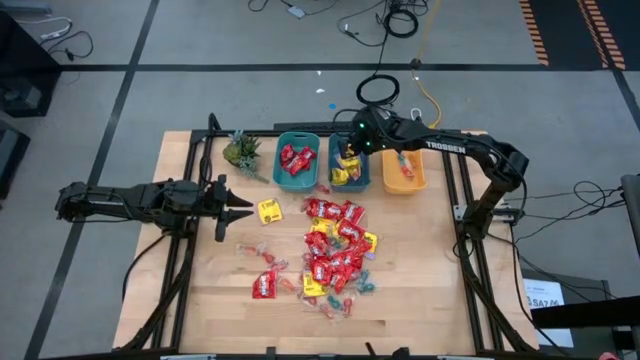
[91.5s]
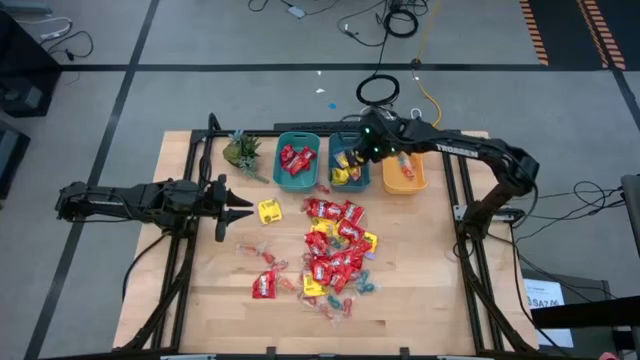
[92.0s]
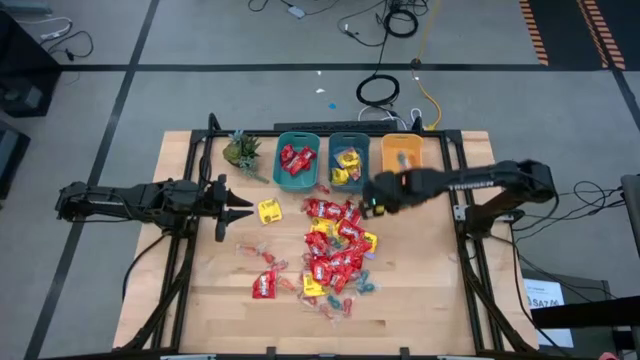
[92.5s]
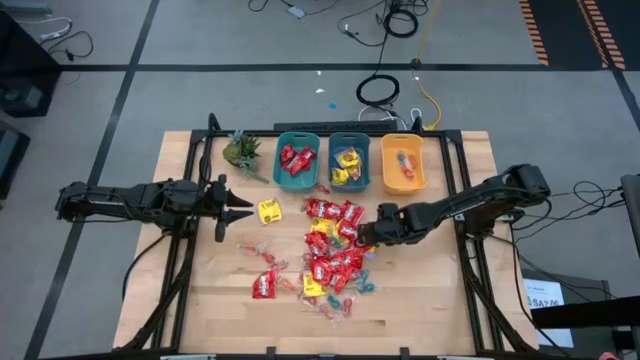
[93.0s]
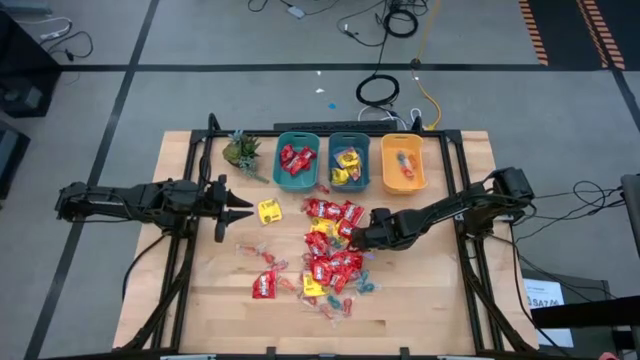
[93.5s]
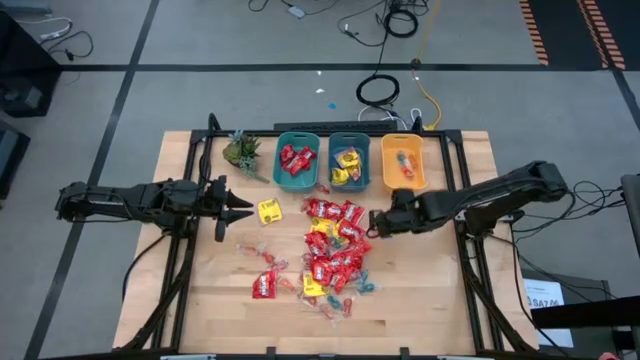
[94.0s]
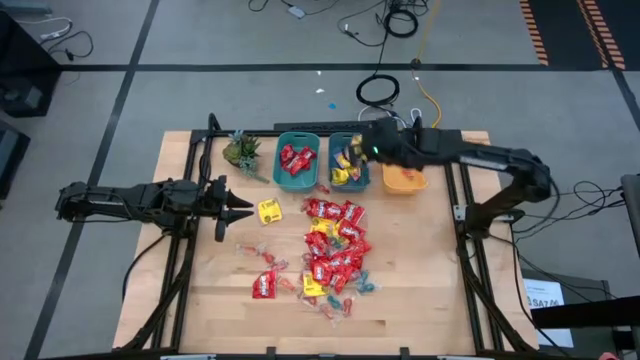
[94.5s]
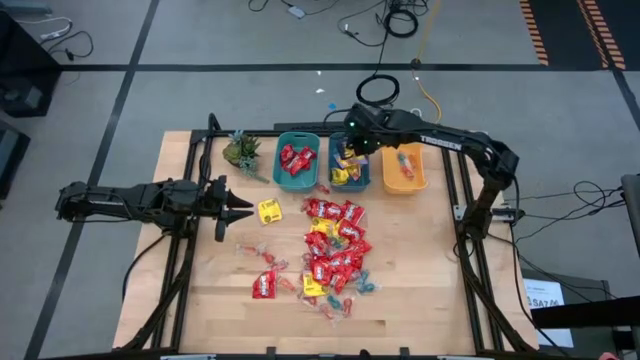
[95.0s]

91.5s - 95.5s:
Task: Sort candy
Put the yellow candy into the blue bin

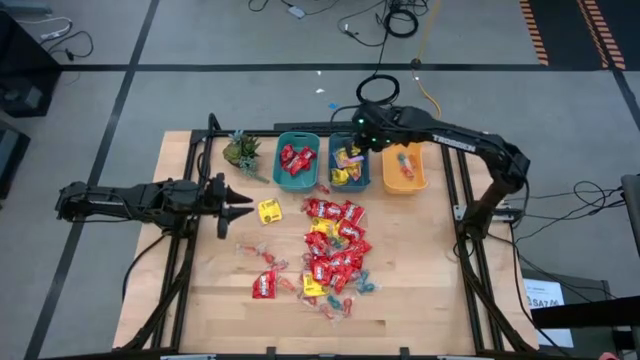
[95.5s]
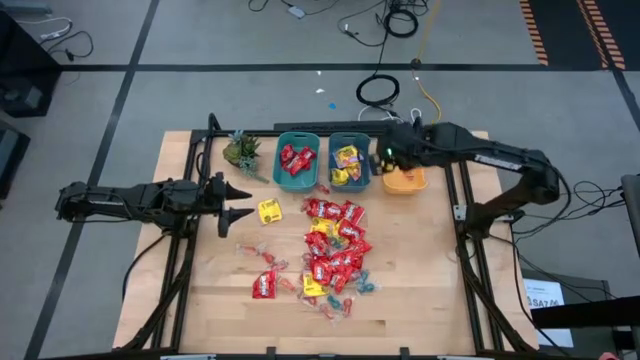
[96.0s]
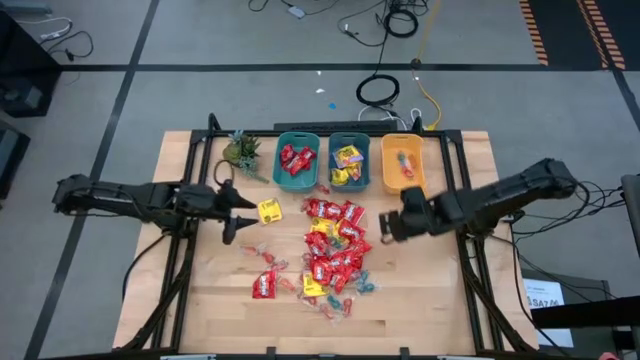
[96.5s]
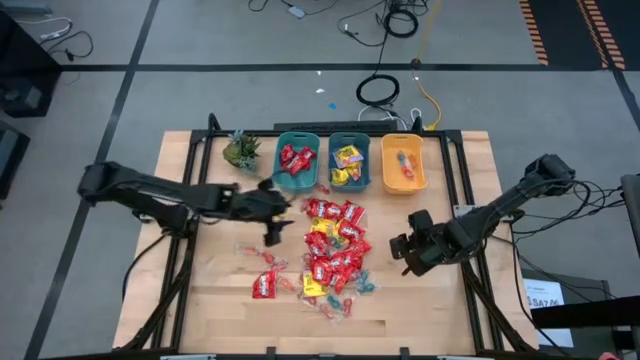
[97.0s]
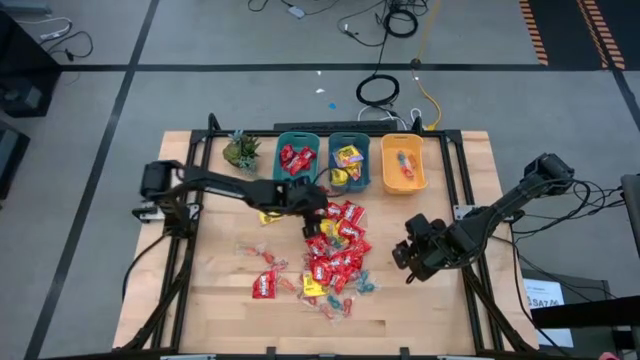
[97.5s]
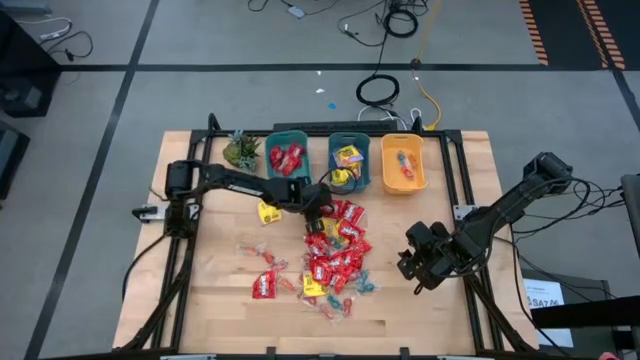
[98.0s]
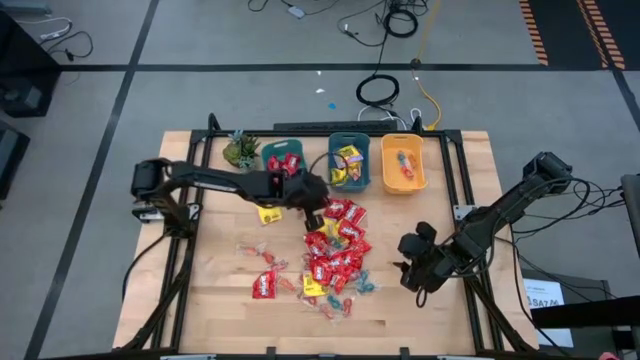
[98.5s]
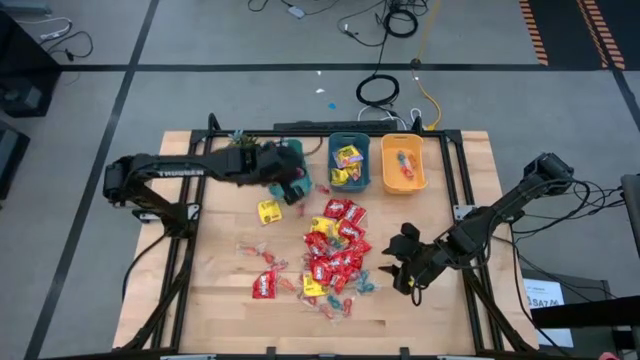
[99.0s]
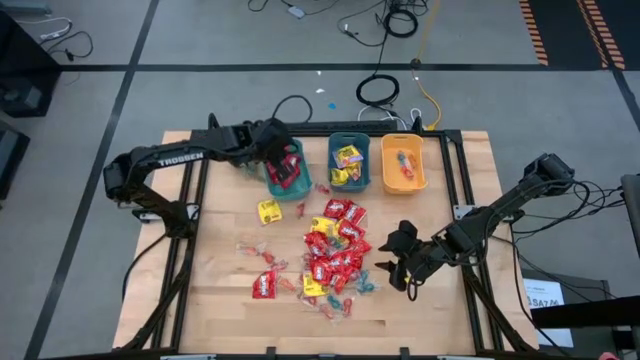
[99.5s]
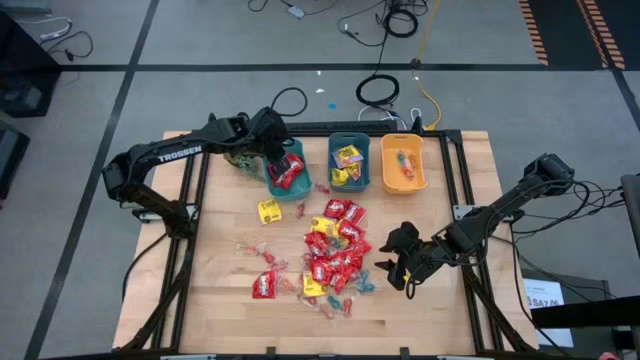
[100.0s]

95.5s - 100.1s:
Put the red candy into the green bin

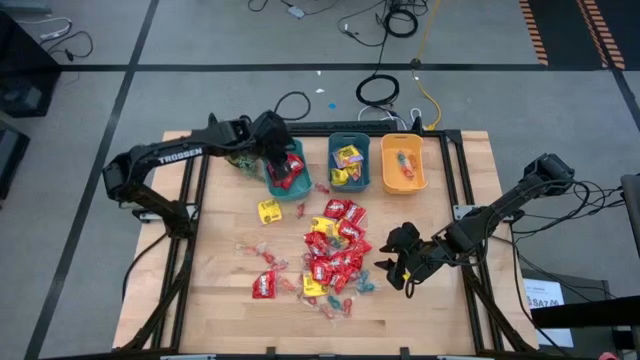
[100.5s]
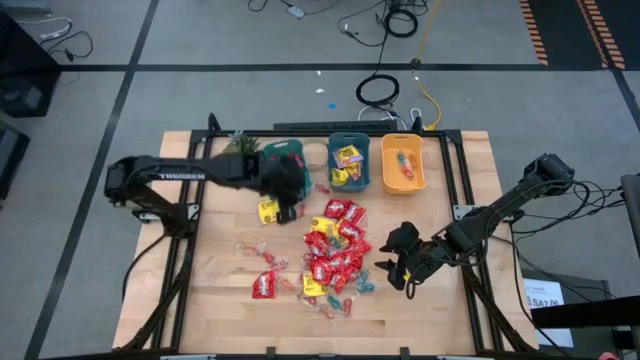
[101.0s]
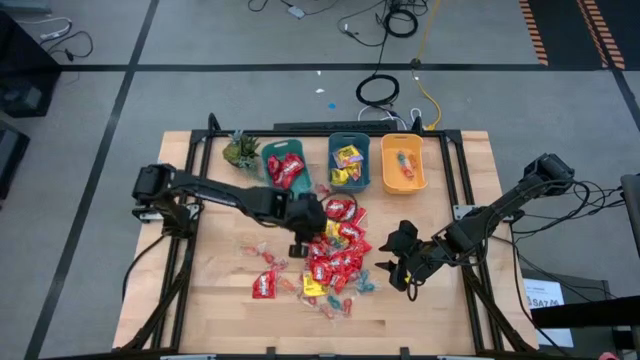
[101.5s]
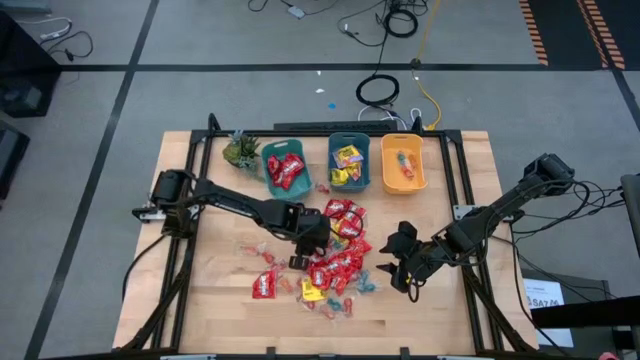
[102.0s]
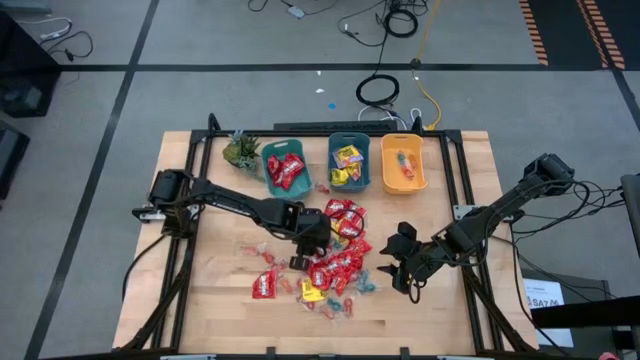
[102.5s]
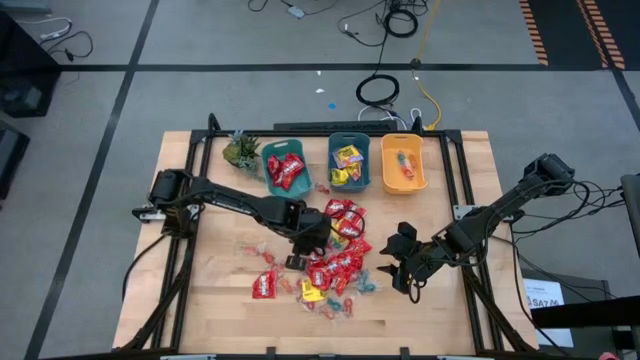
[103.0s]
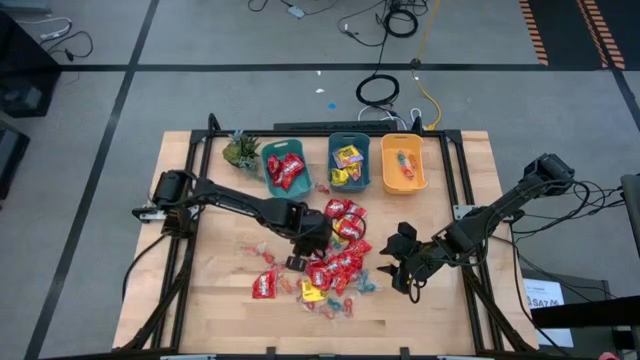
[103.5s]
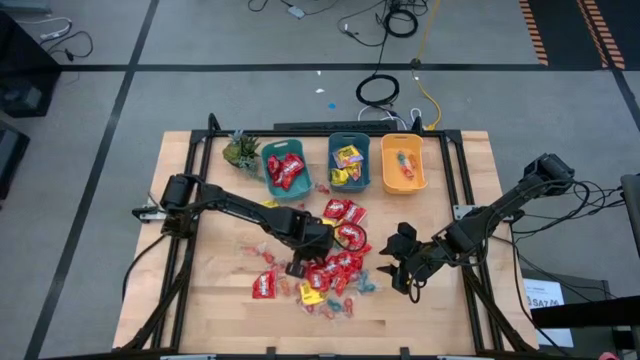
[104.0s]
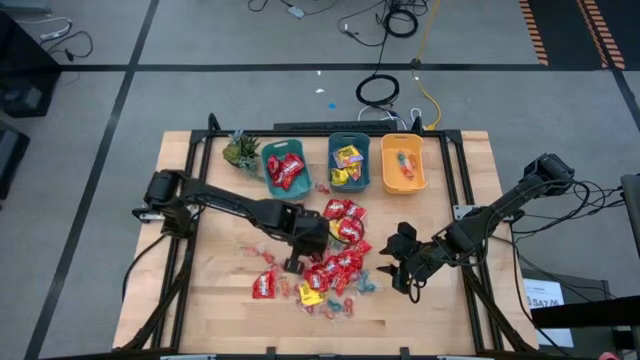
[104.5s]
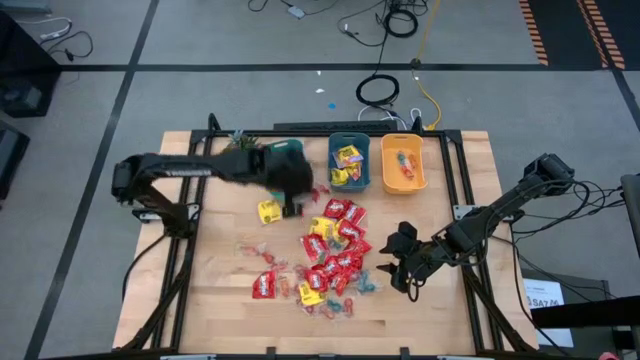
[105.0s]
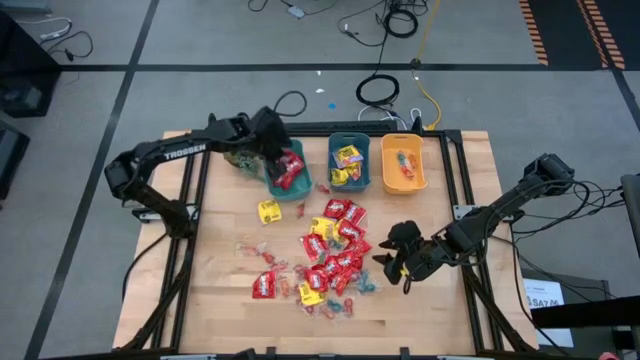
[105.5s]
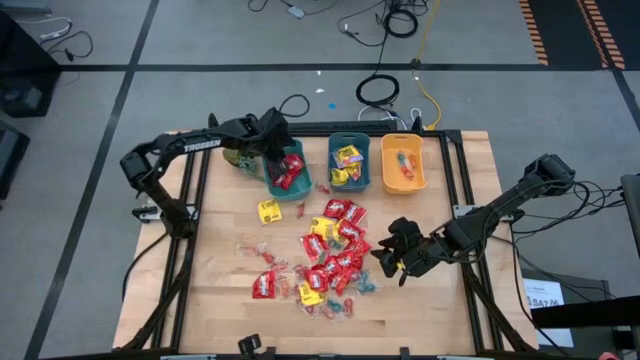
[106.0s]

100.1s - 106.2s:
Put the red candy into the green bin

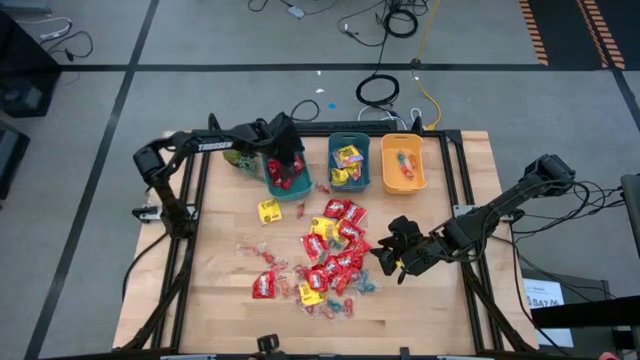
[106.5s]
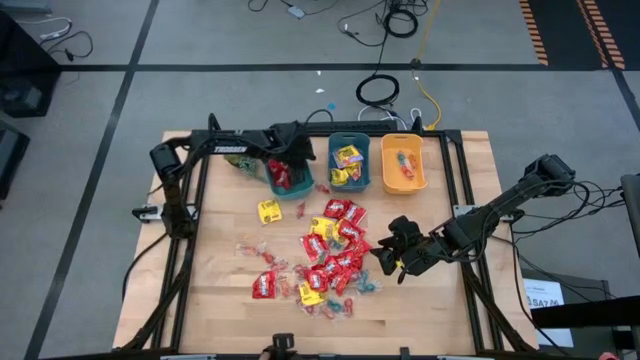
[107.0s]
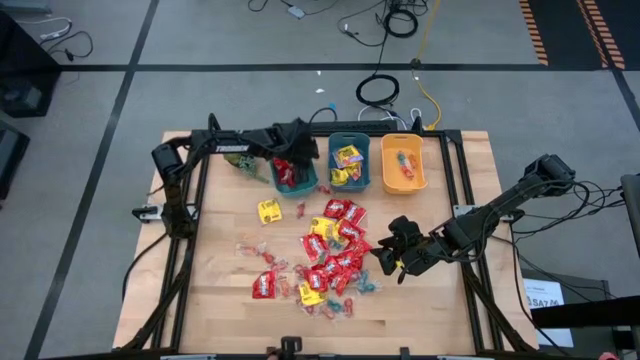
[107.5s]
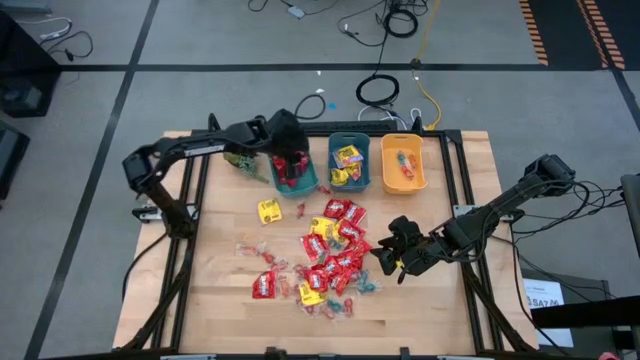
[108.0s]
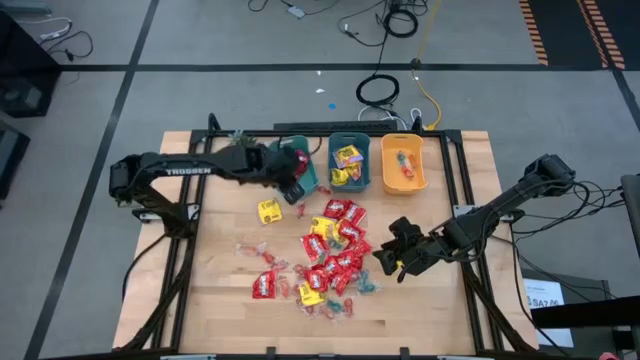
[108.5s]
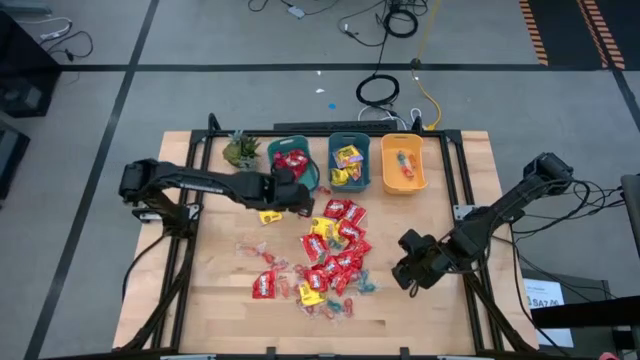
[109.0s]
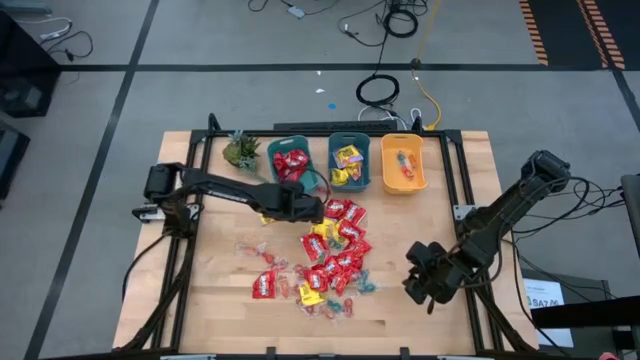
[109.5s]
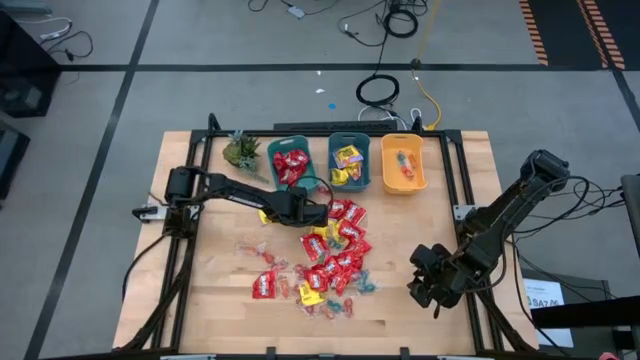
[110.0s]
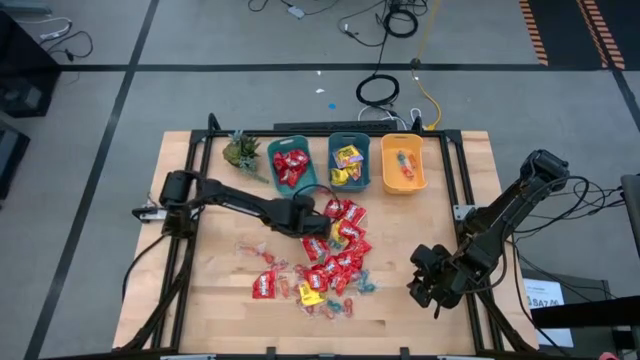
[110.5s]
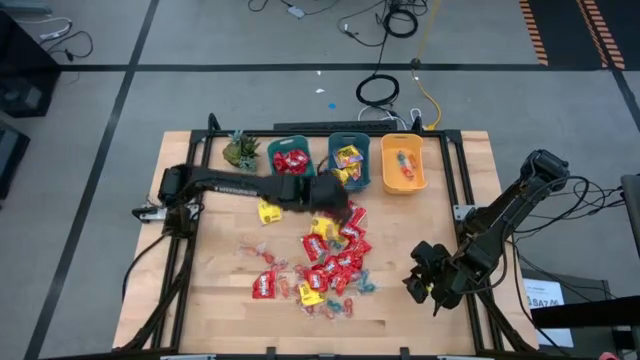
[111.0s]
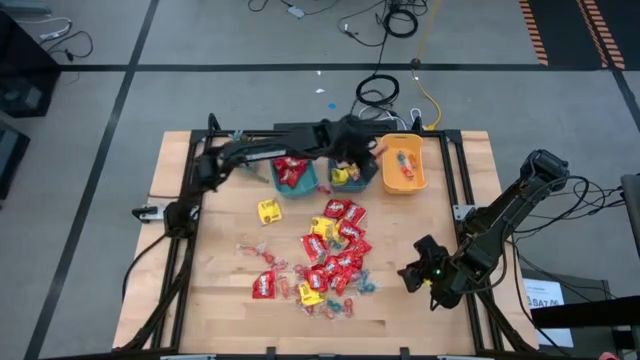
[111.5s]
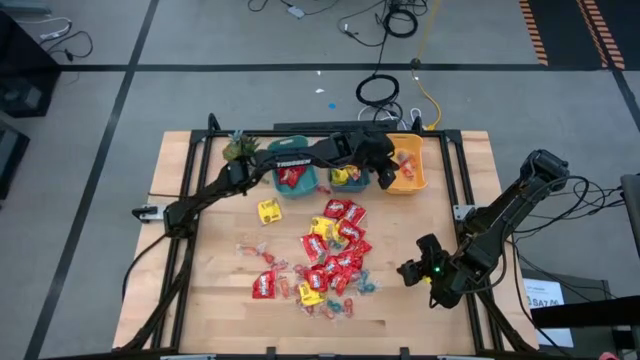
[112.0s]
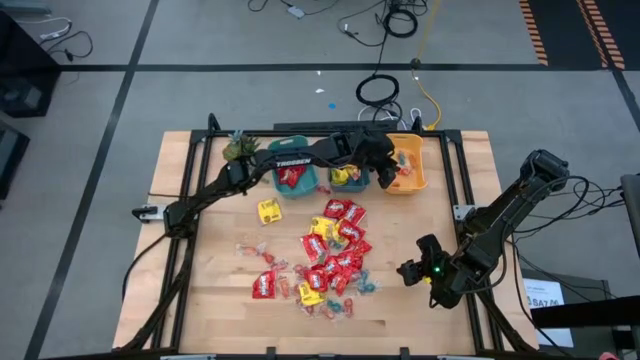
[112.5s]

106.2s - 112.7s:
Put the red gummy candy into the yellow bin
